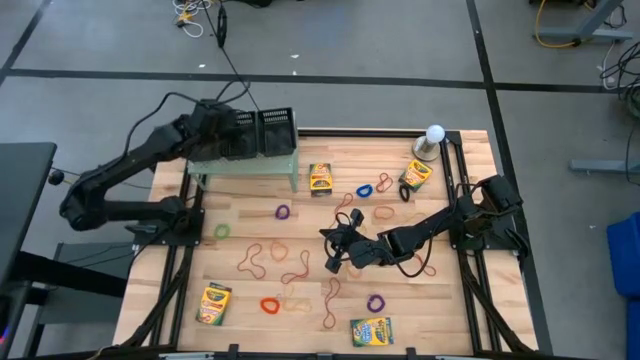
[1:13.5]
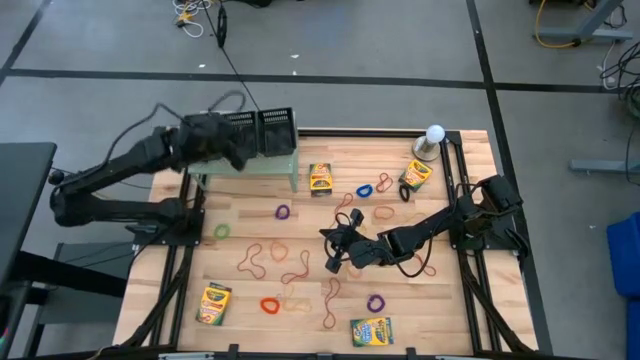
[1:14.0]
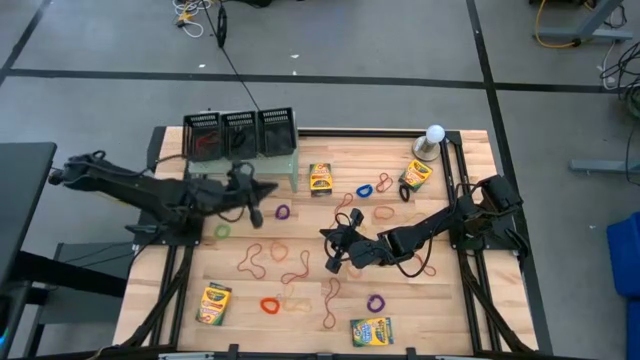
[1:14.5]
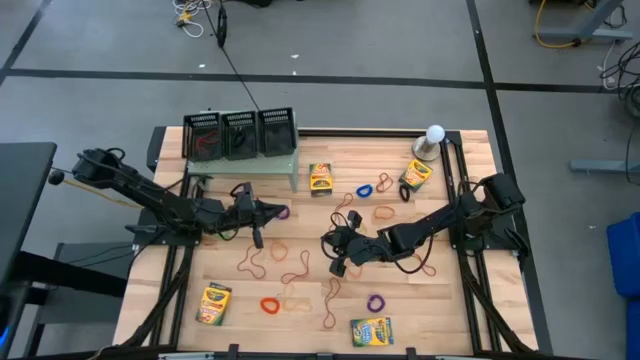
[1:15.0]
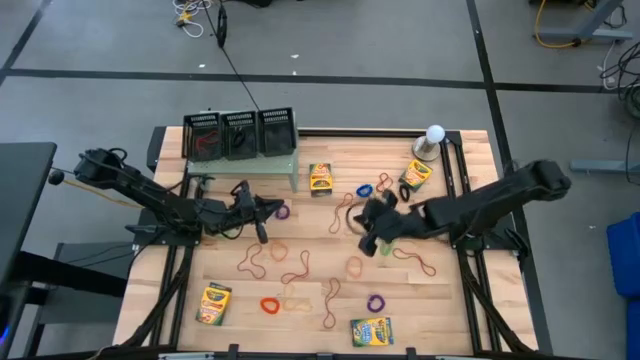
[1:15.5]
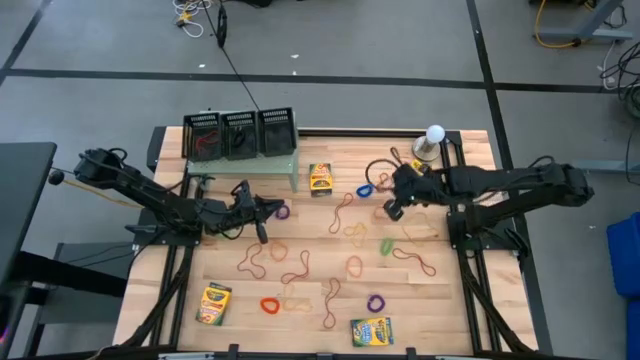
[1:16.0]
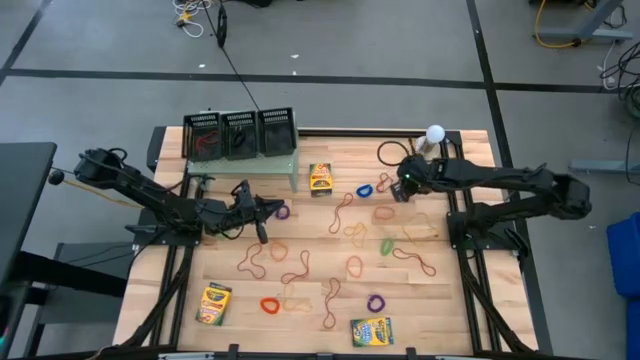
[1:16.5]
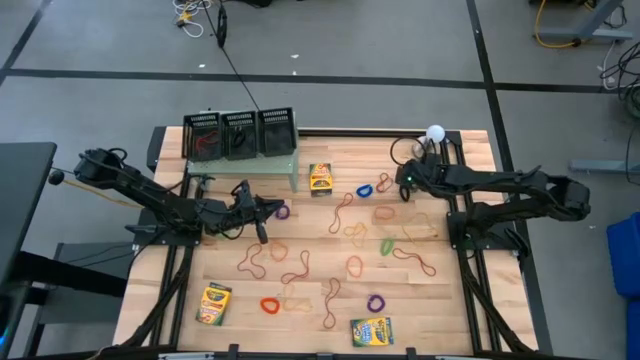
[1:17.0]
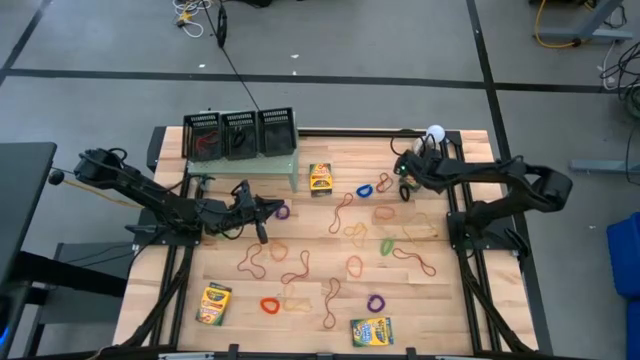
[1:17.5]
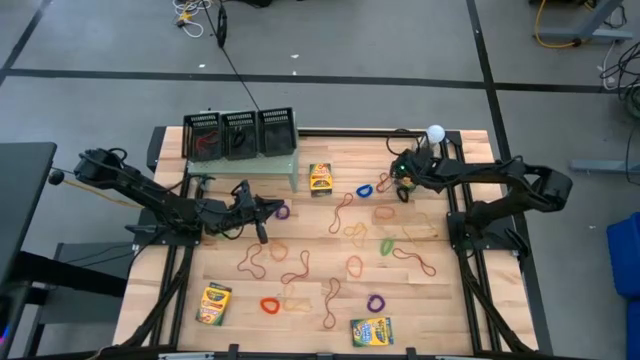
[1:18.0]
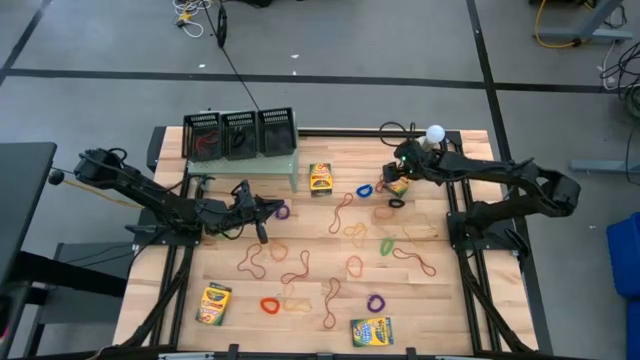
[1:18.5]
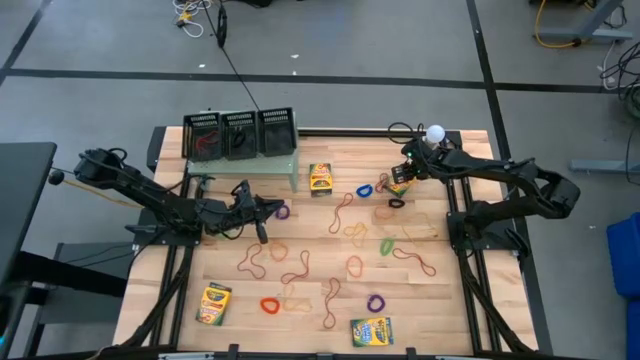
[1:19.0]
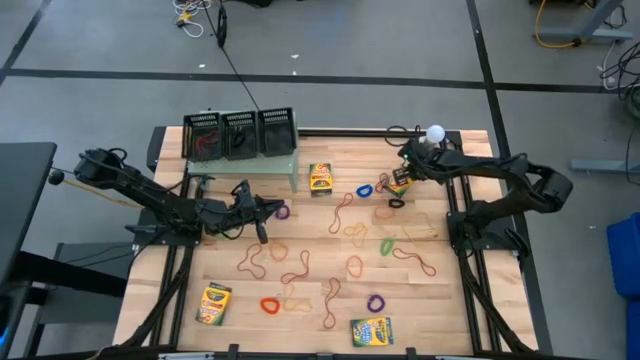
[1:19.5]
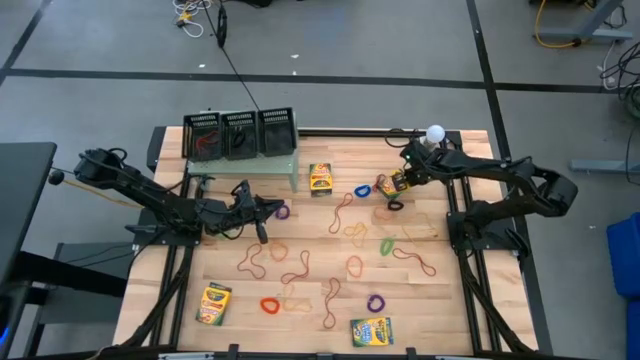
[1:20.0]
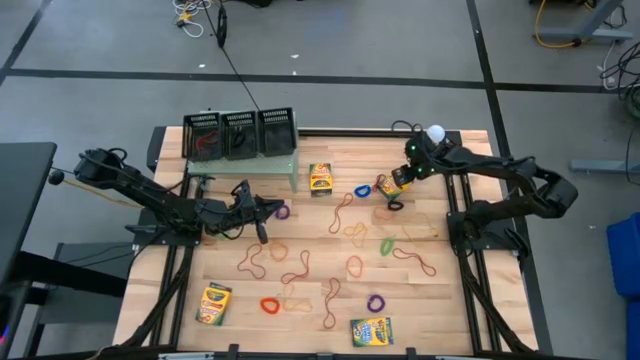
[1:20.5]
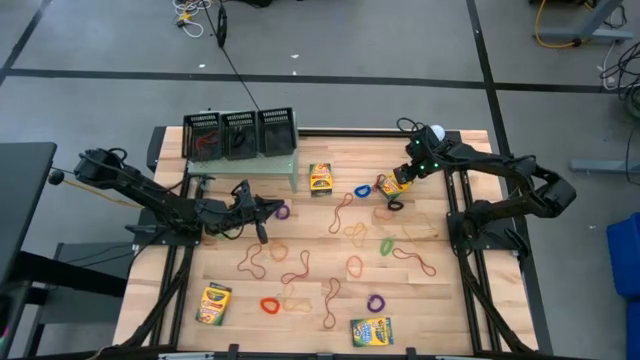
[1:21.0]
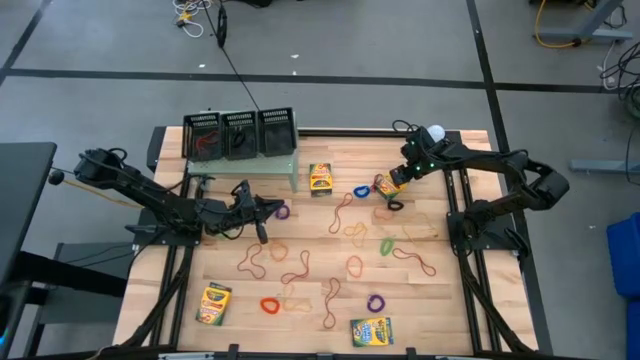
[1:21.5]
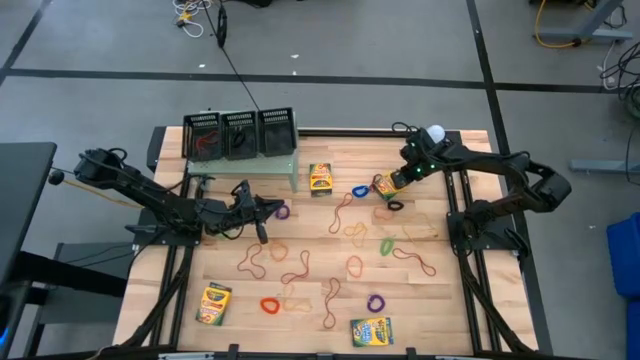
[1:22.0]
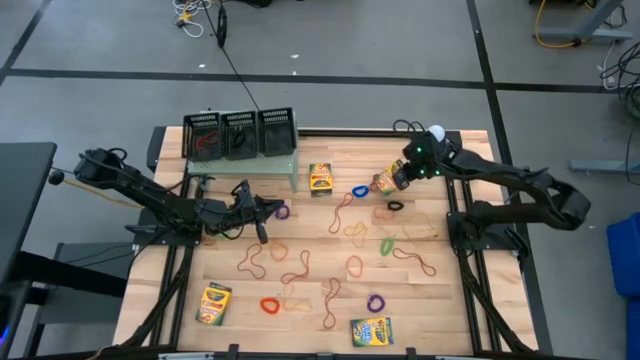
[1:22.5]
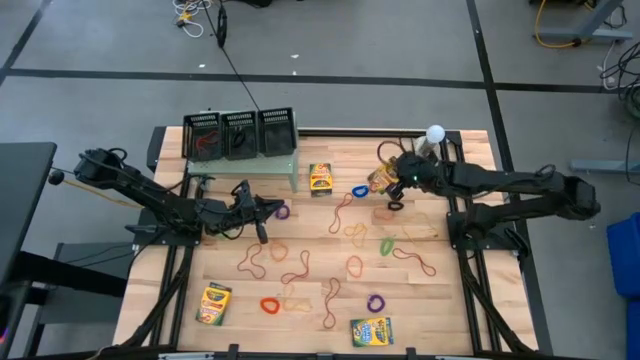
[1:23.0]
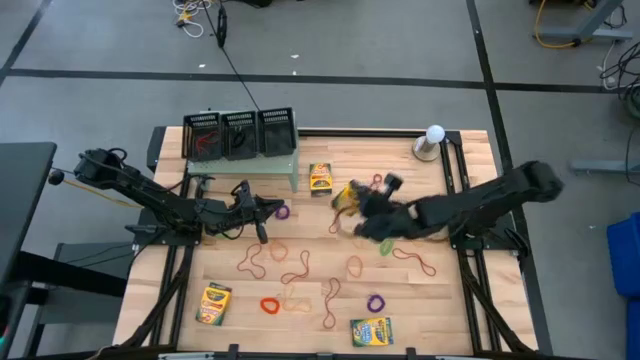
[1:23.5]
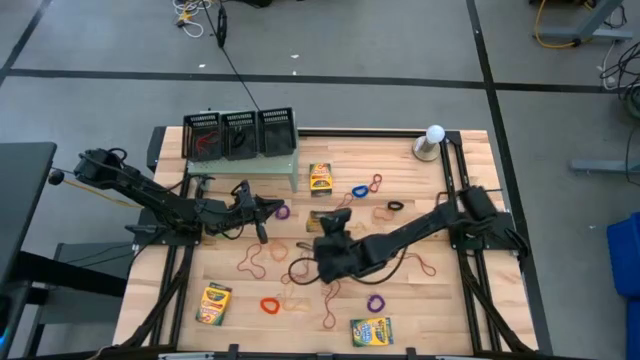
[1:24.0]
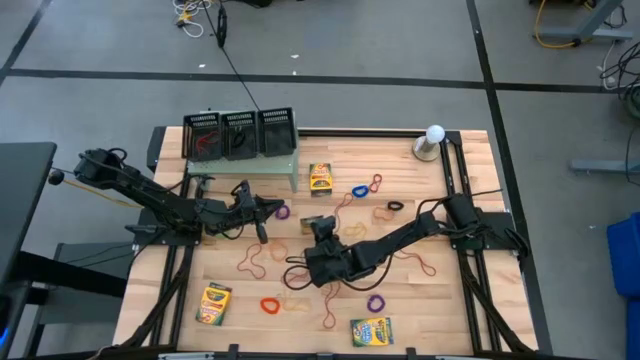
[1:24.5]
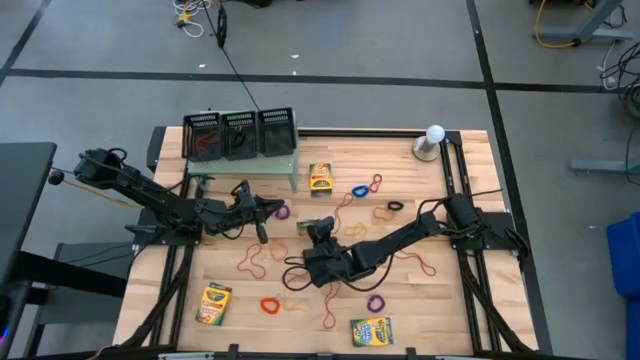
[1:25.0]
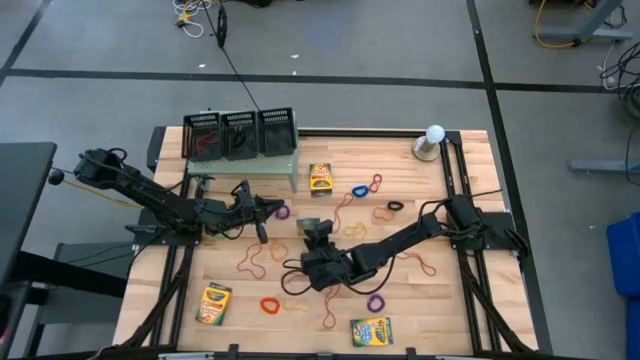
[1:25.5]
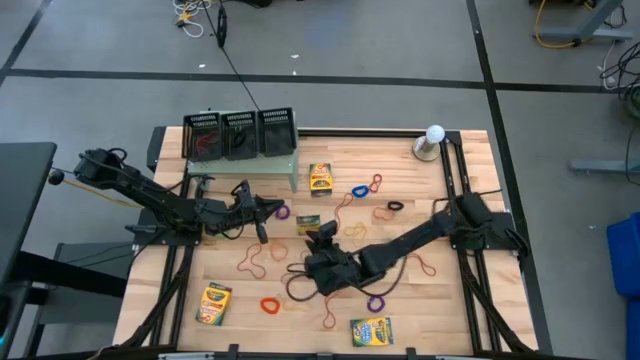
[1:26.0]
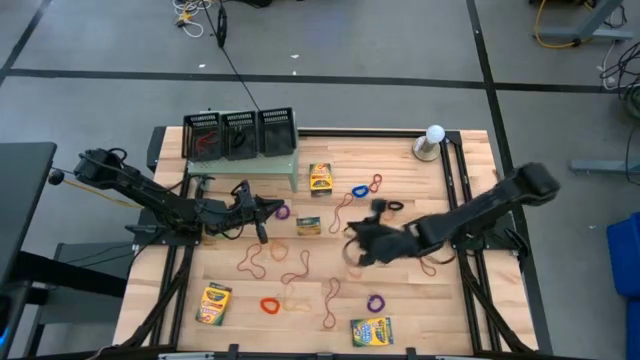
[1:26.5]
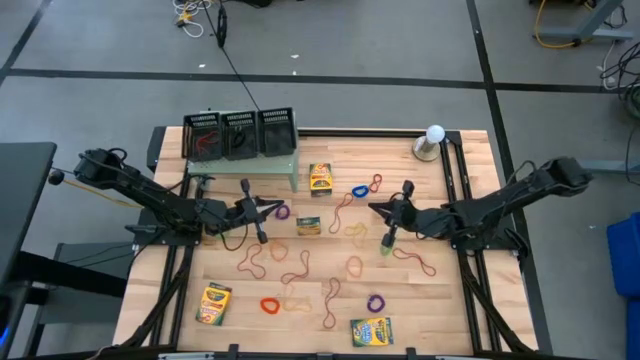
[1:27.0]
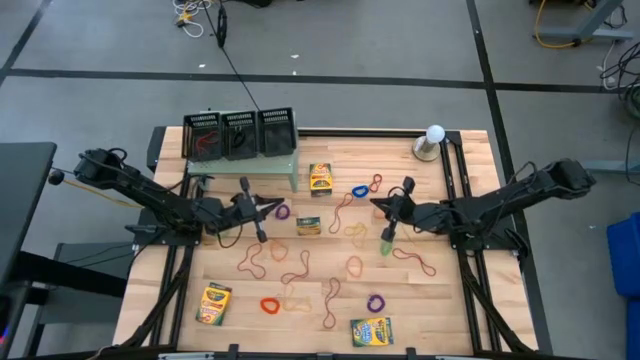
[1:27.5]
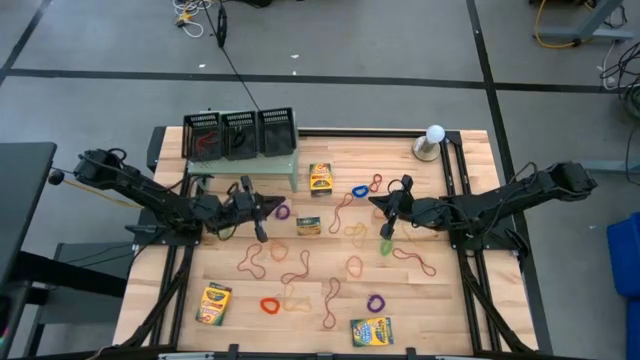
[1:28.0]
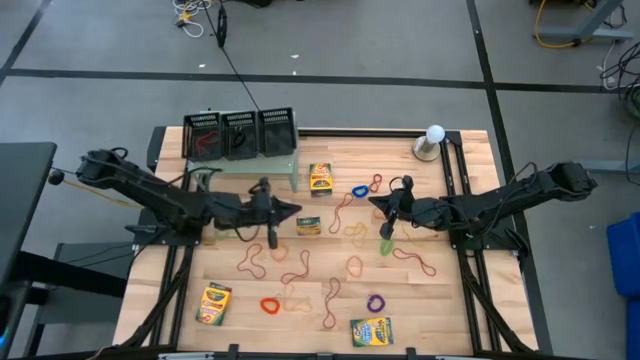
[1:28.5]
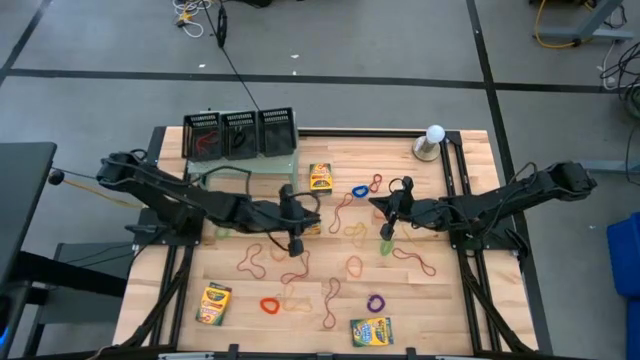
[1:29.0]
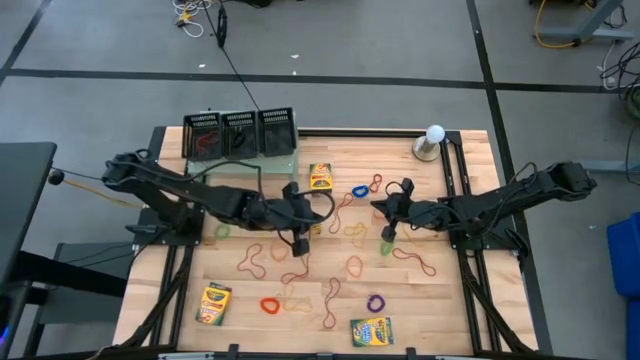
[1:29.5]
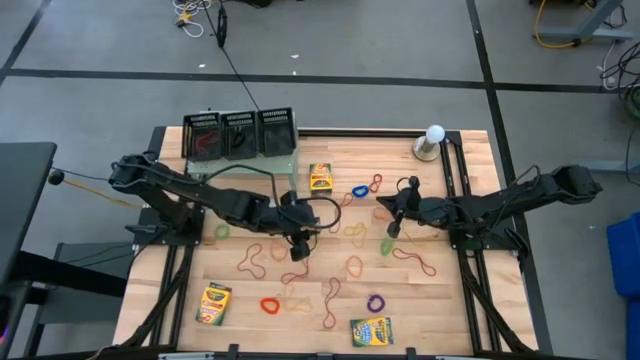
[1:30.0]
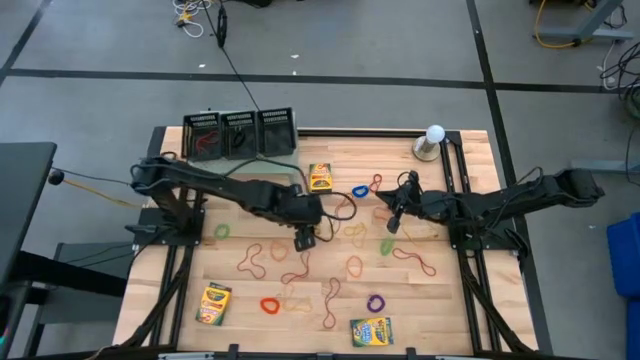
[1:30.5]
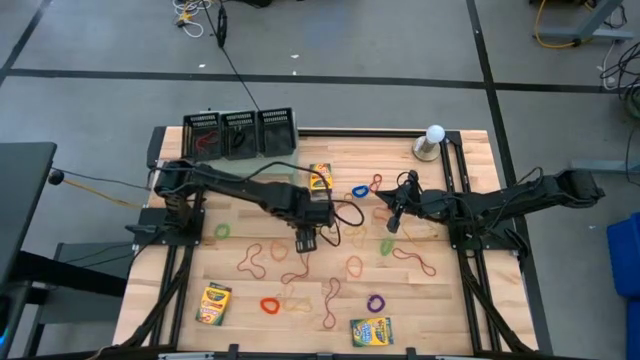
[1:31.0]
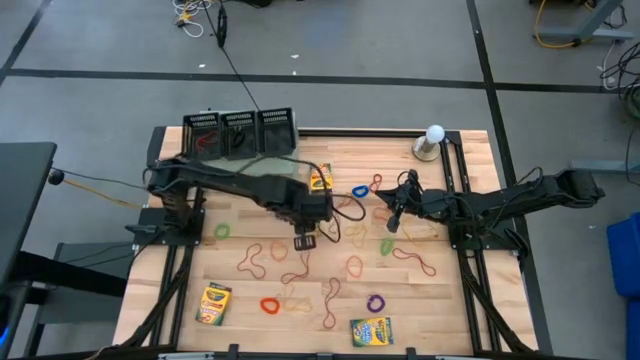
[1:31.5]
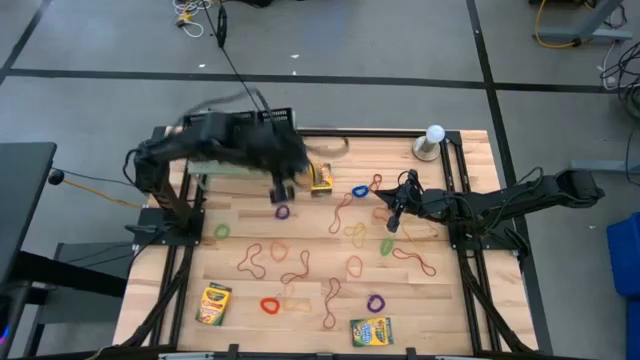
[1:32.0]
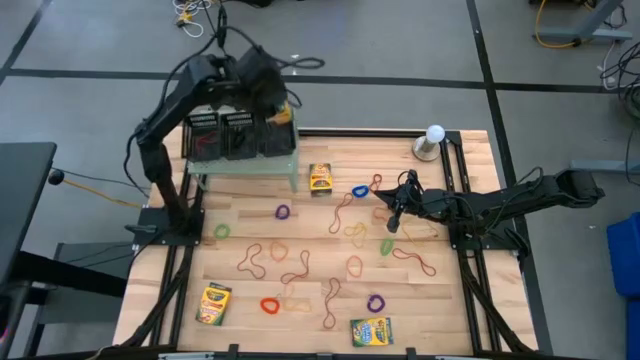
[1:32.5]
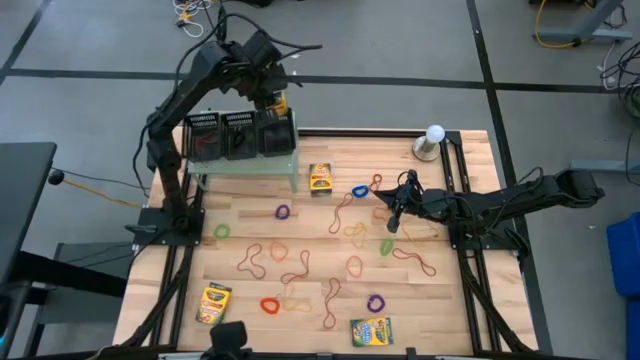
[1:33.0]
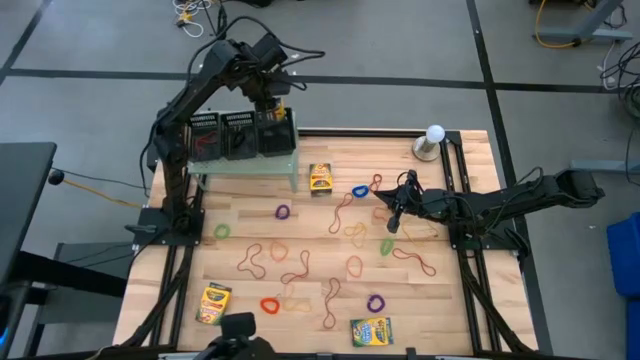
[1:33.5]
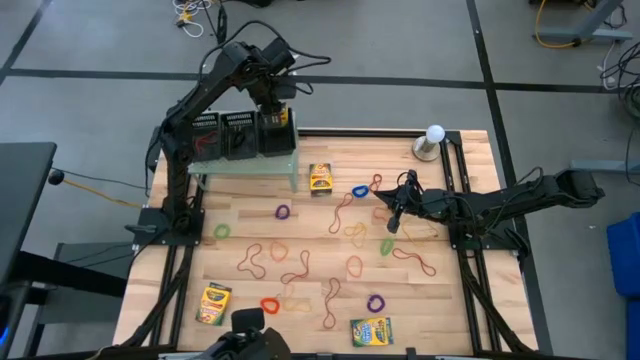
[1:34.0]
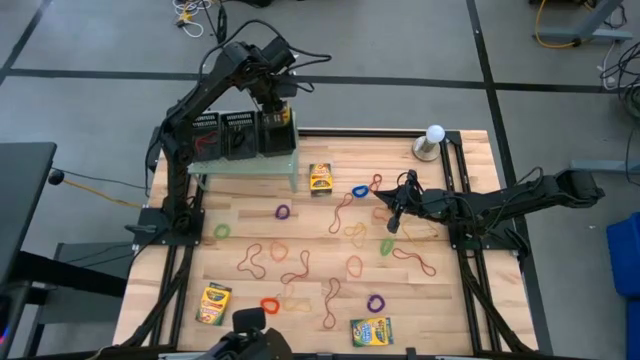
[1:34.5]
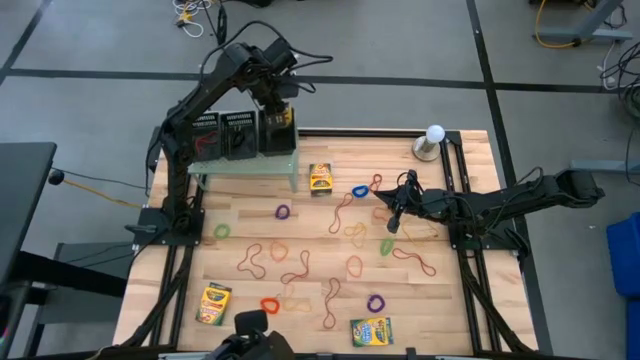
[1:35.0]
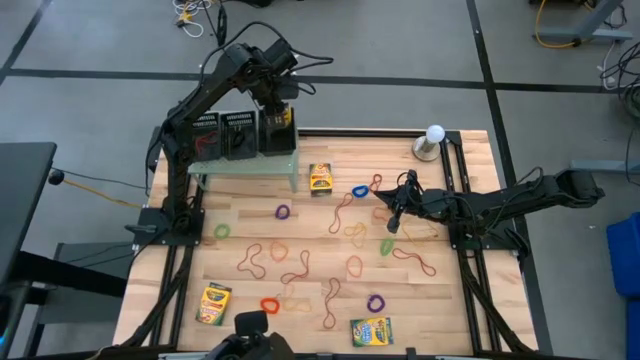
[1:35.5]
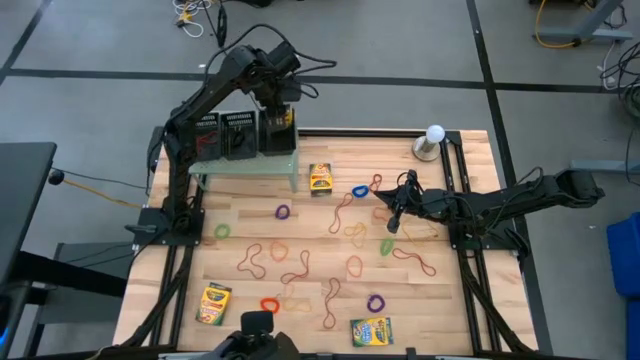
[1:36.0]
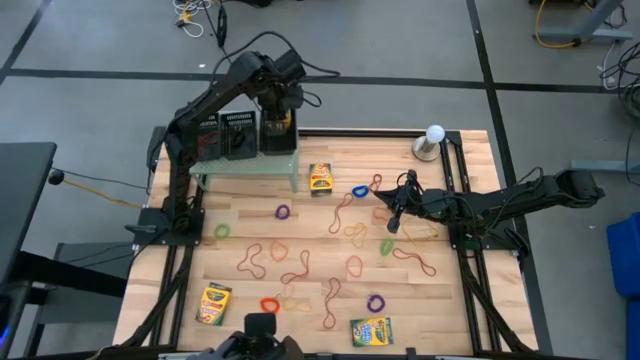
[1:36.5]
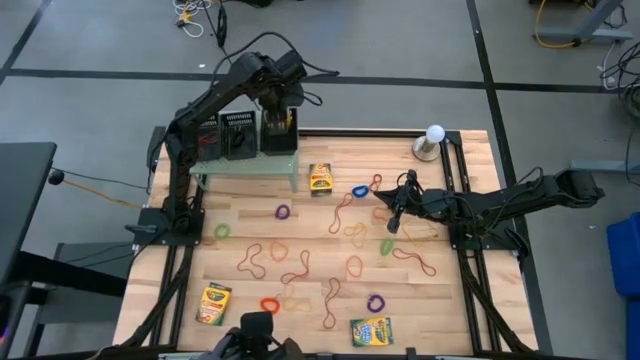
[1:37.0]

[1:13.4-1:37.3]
Task: Pick & Place Office Desk Supplies
Put the crayon box into the right black bin on the shelf
